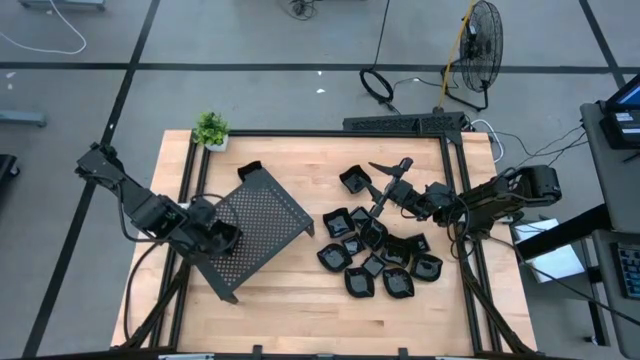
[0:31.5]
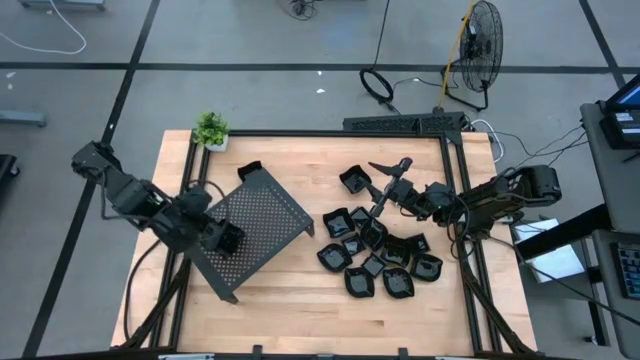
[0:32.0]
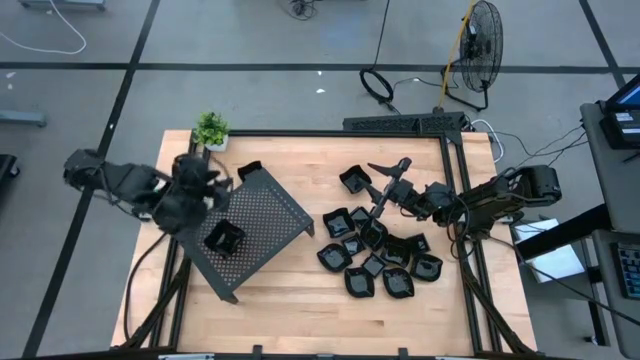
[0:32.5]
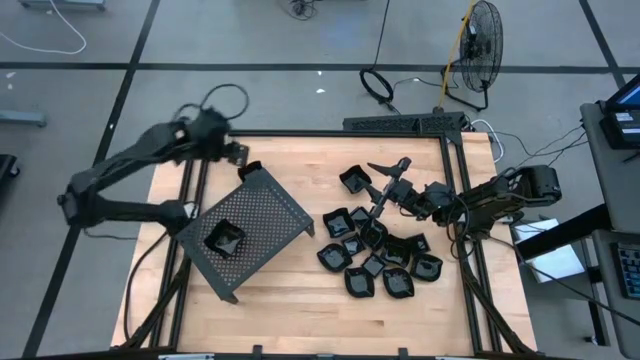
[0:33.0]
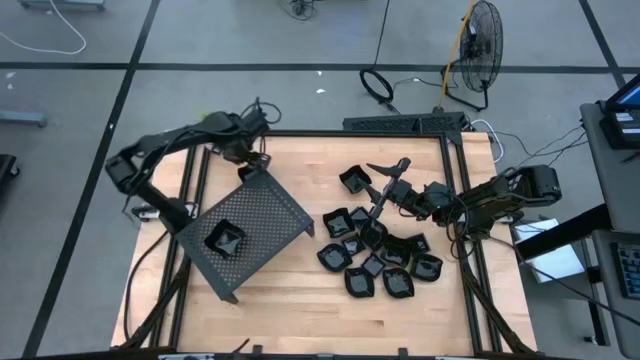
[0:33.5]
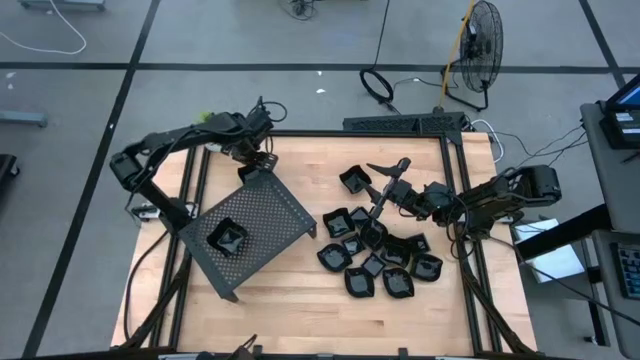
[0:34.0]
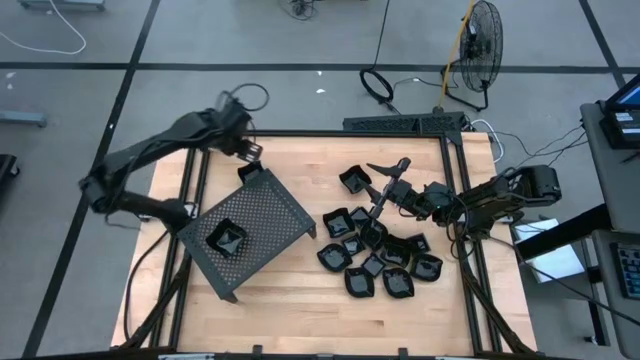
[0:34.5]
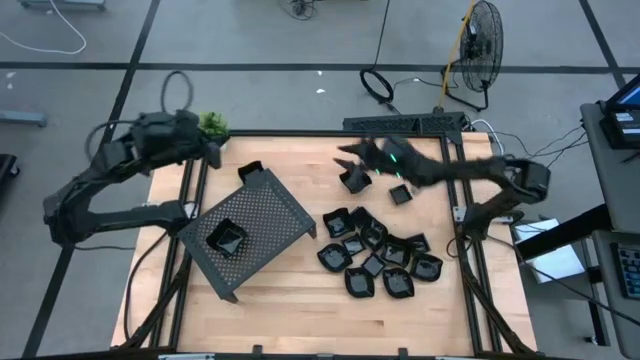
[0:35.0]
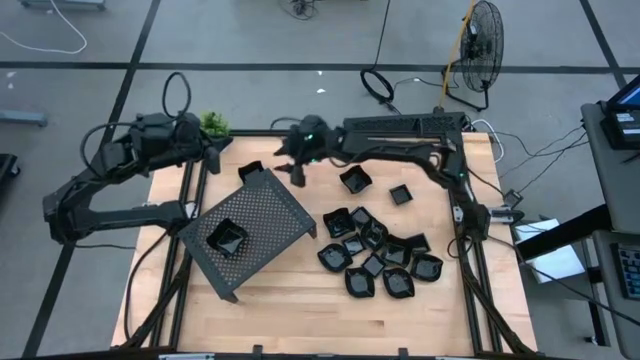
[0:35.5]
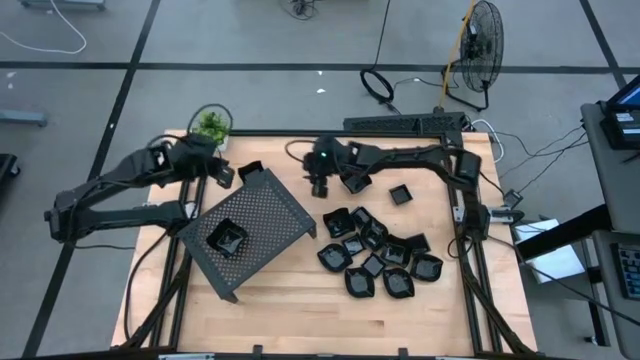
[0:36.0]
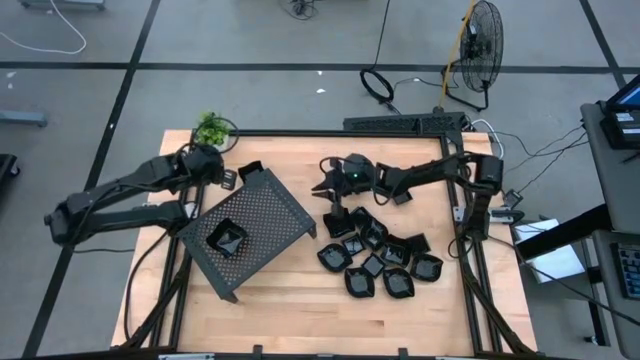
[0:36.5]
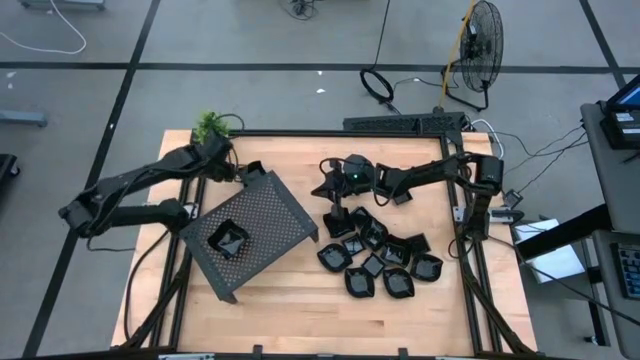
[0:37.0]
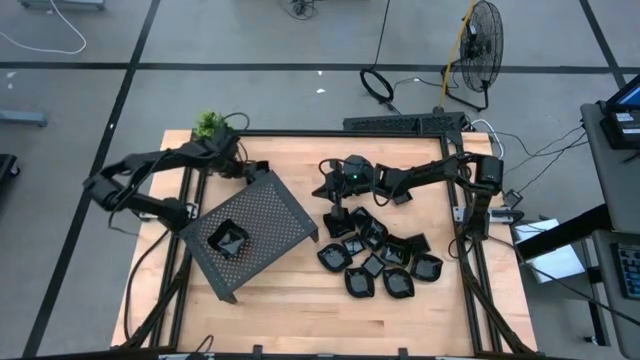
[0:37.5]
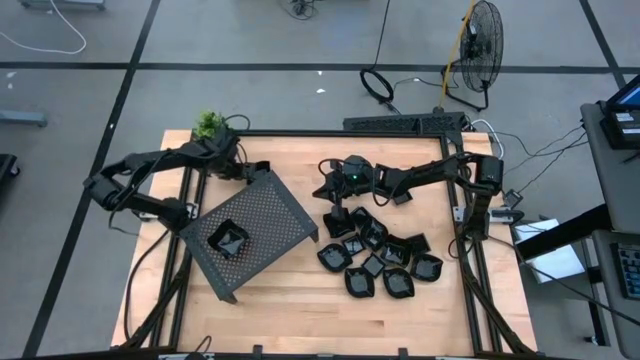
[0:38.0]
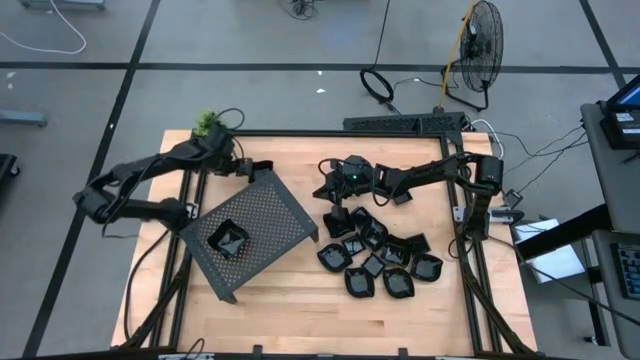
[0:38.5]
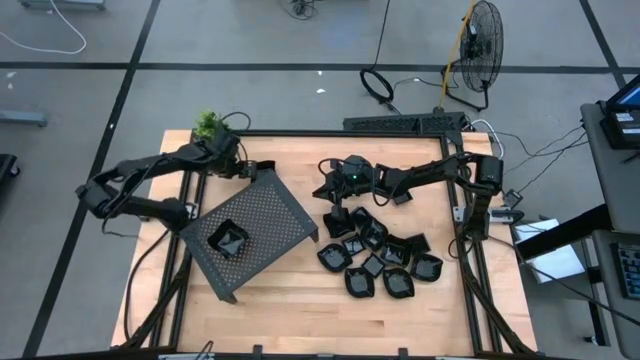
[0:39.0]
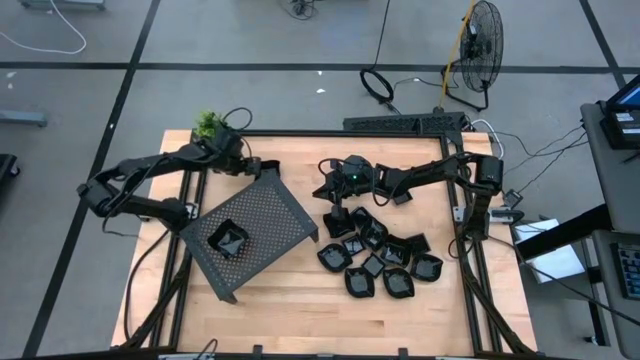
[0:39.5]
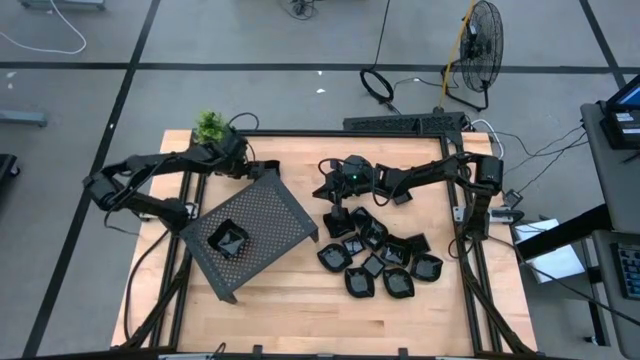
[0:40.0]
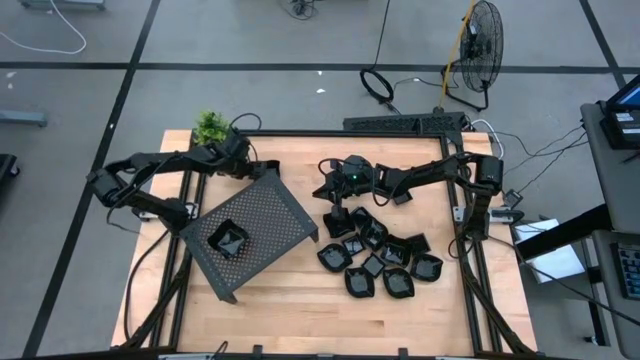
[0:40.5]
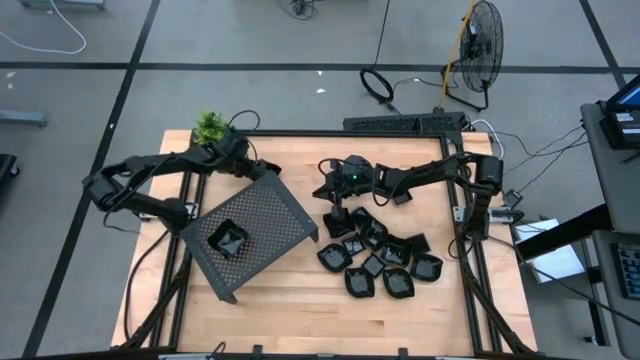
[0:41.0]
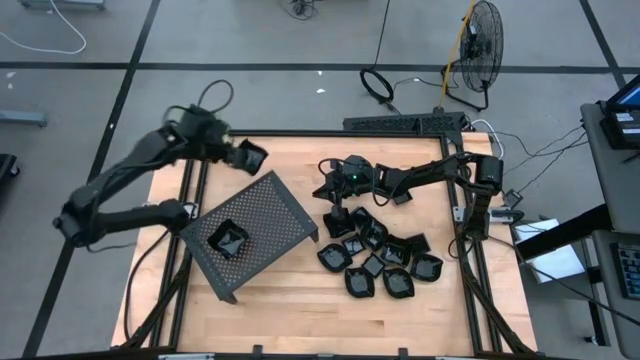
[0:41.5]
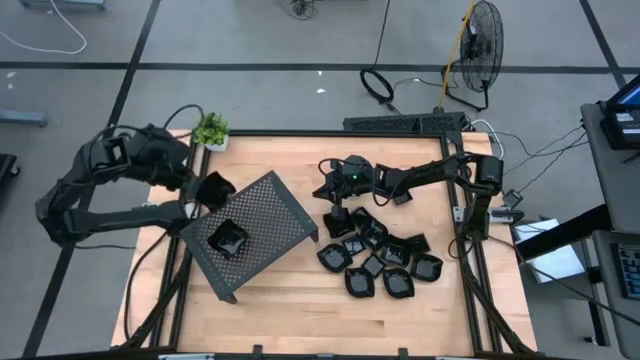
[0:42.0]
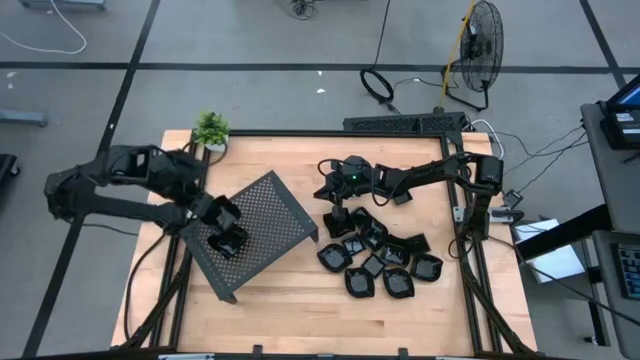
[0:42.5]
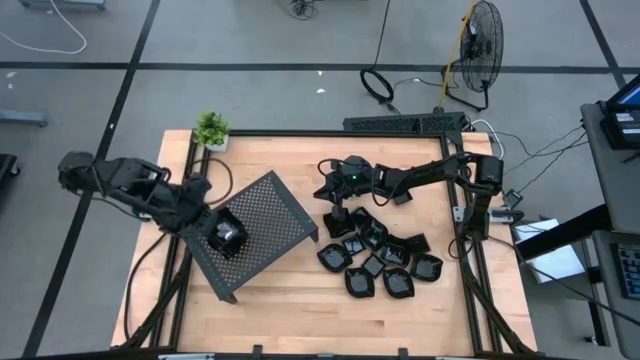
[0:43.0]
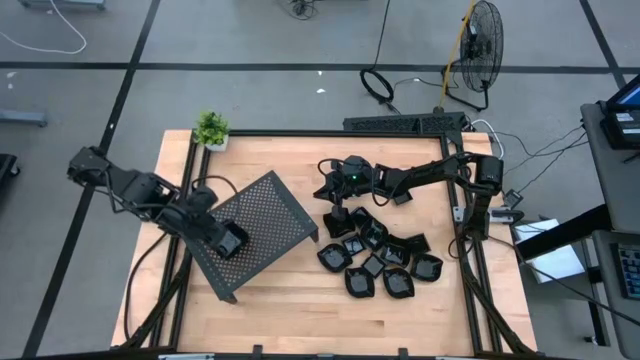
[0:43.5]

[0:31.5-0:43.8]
Task: Pick & Place Mini shaped plates
Stack the distorted square plate on top of the distorted square plate on the shelf

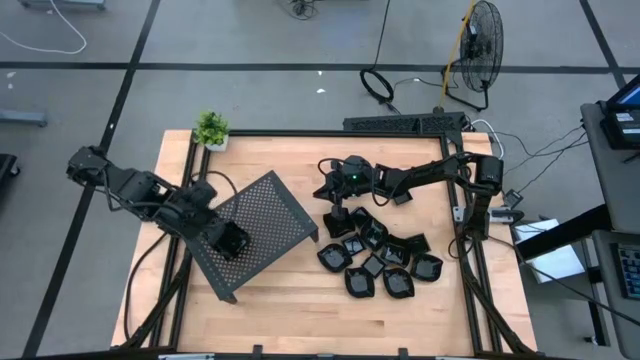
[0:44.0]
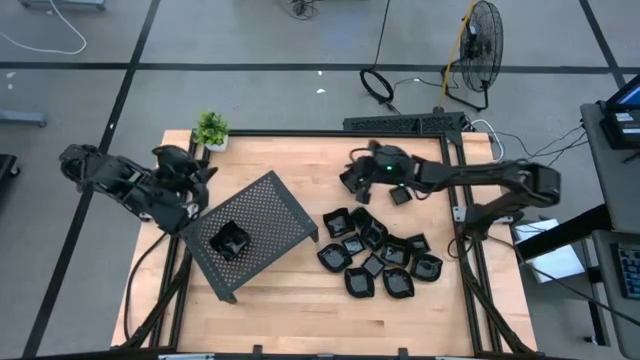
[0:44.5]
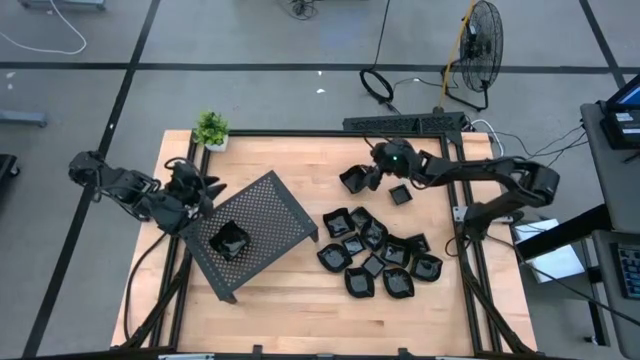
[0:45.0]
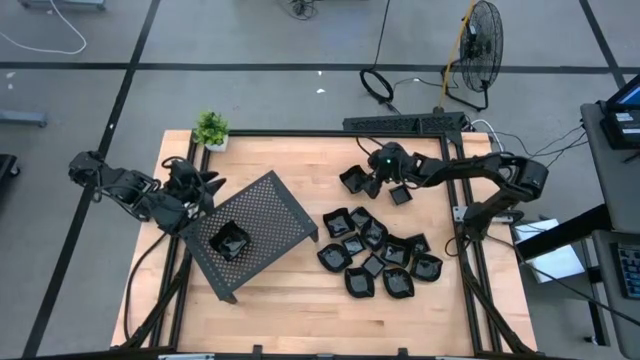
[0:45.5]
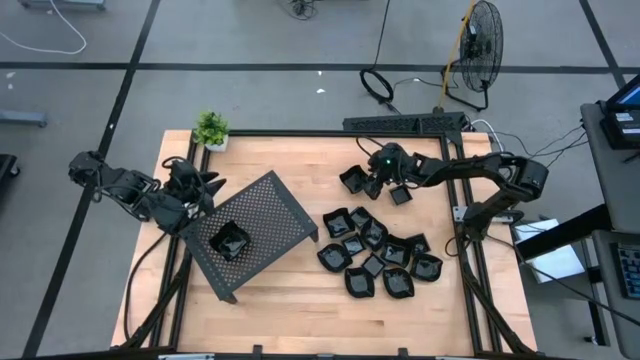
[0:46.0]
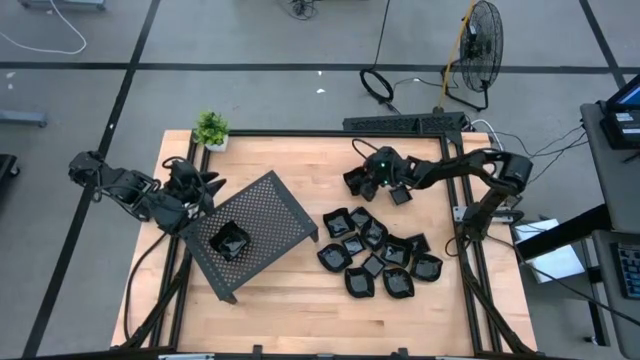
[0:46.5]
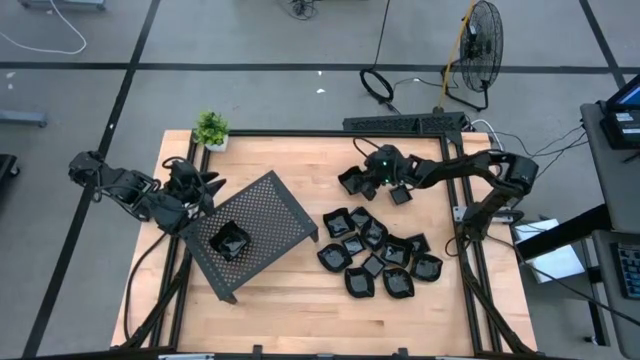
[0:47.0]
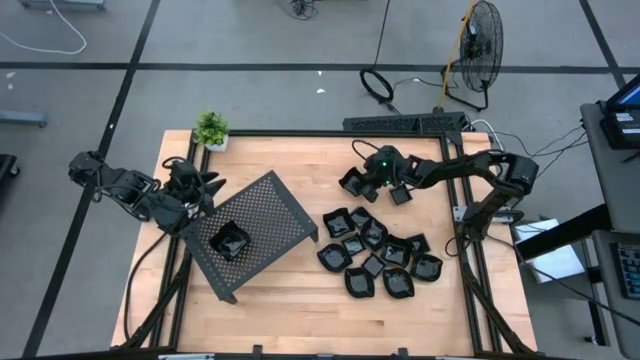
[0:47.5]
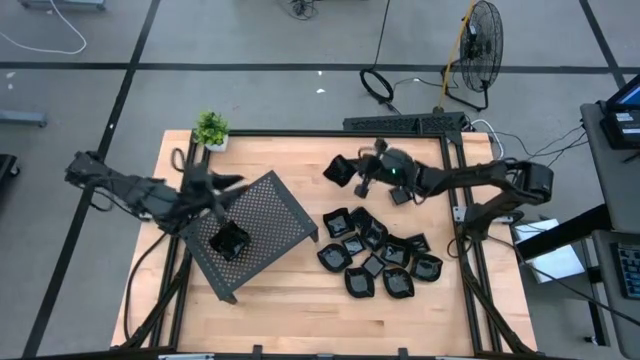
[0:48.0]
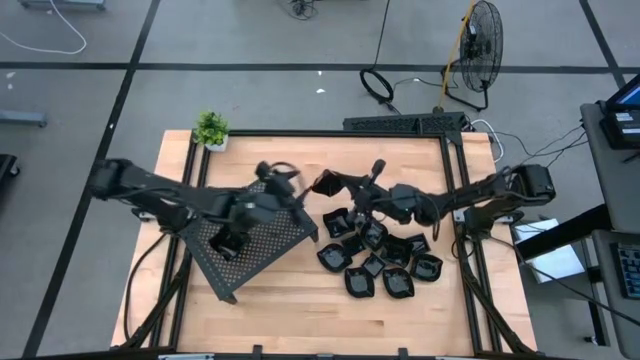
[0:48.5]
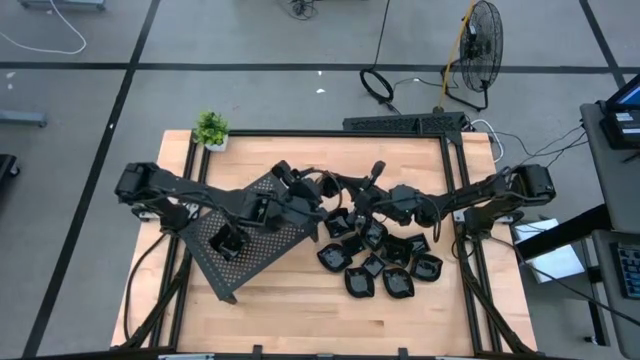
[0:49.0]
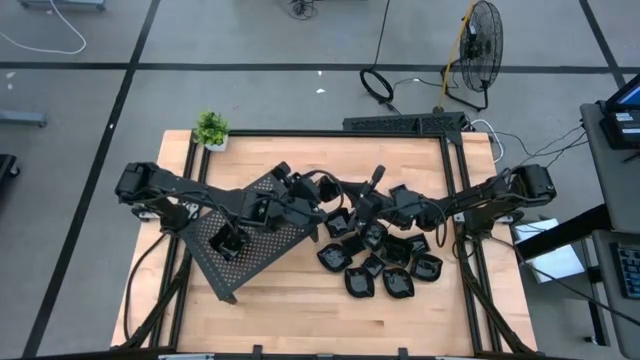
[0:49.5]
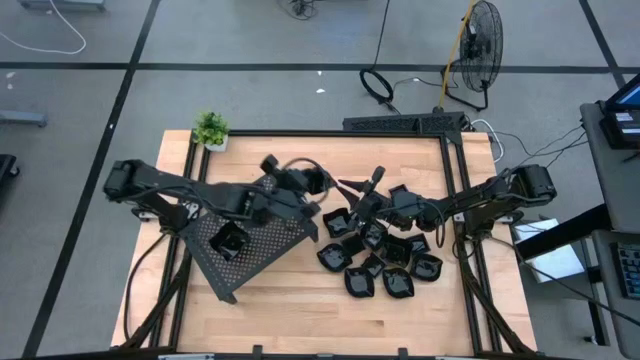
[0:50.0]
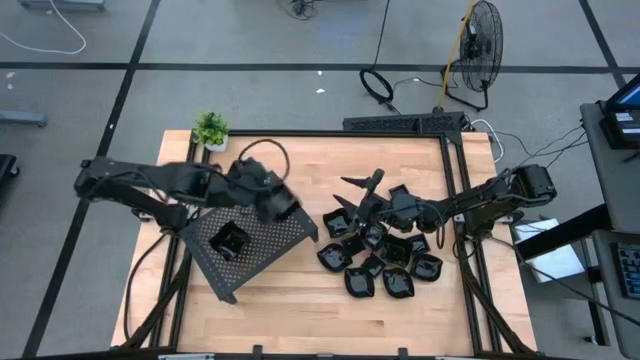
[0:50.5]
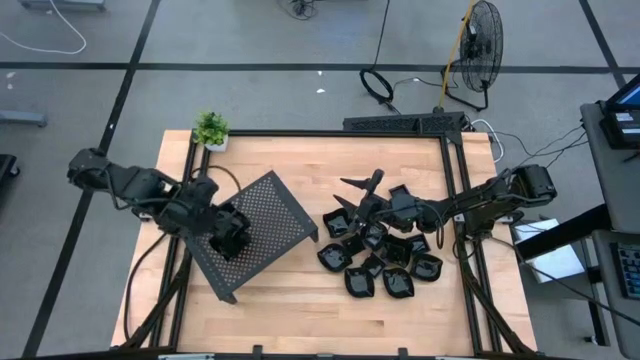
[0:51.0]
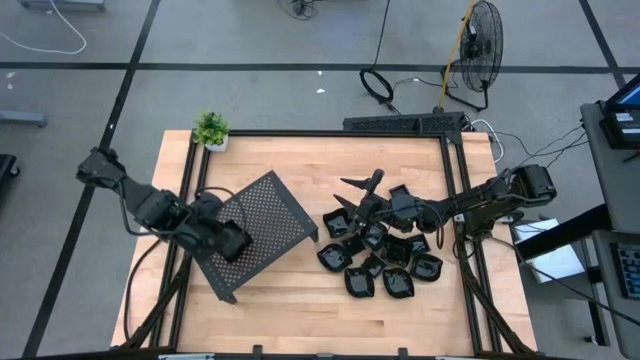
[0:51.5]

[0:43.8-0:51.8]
Stack the distorted square plate on top of the distorted square plate on the shelf

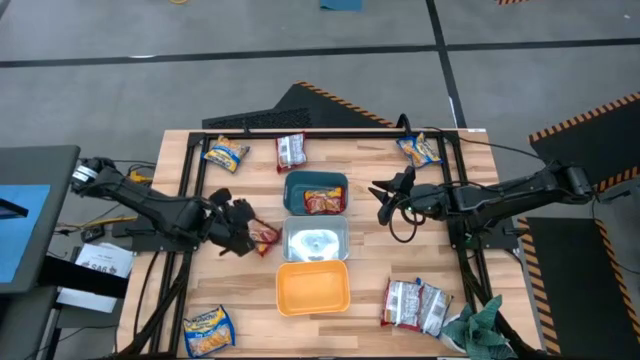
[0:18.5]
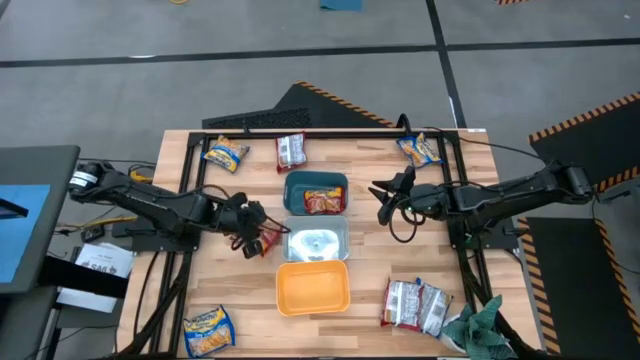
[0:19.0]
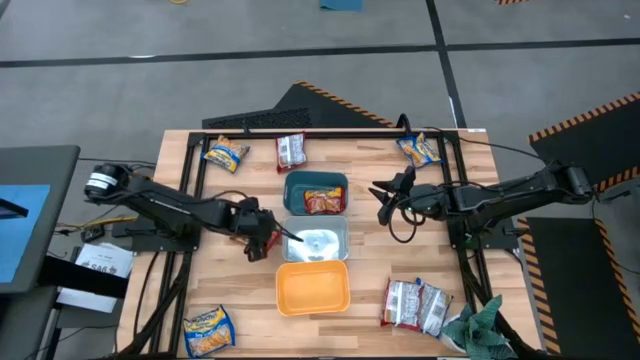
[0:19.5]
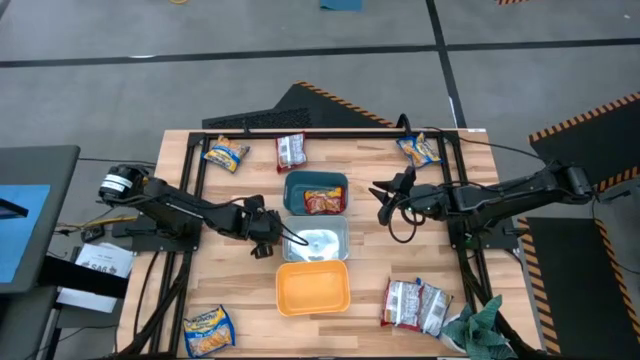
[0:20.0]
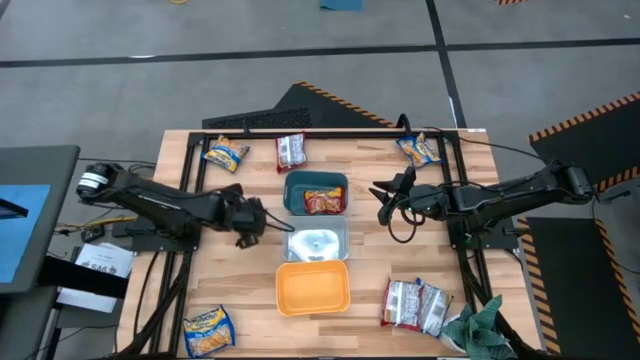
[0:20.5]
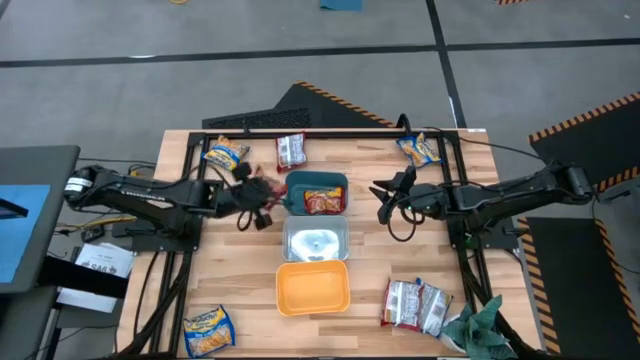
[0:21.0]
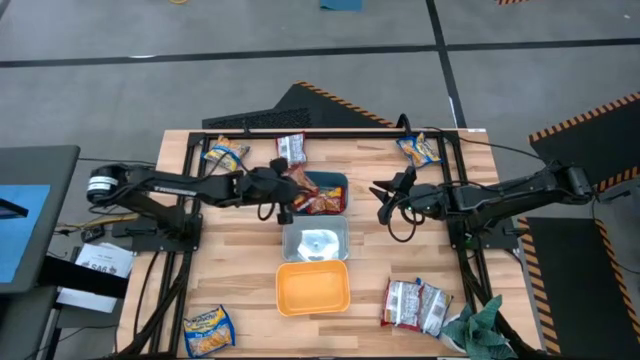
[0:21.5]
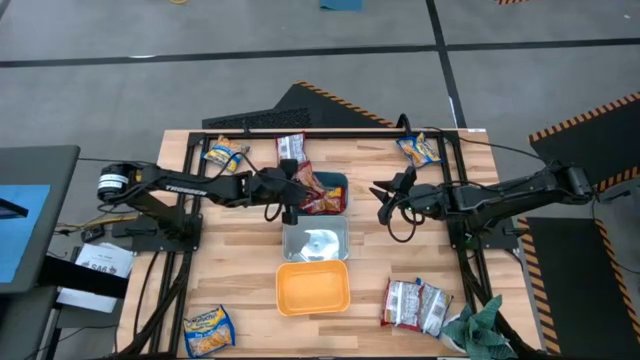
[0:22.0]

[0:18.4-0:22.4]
Task: Sort Maruchan noodles
Put the red noodle pack into the green bin
